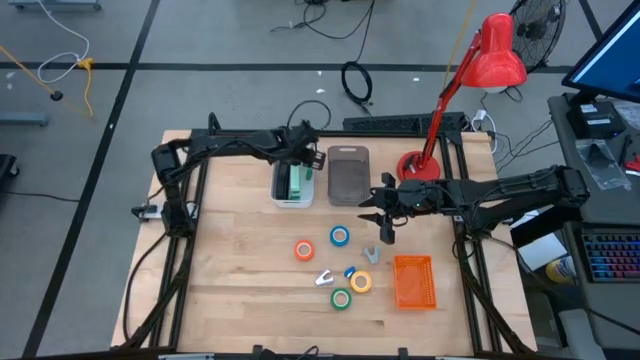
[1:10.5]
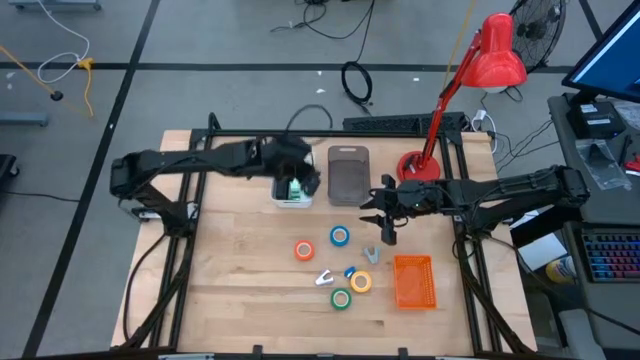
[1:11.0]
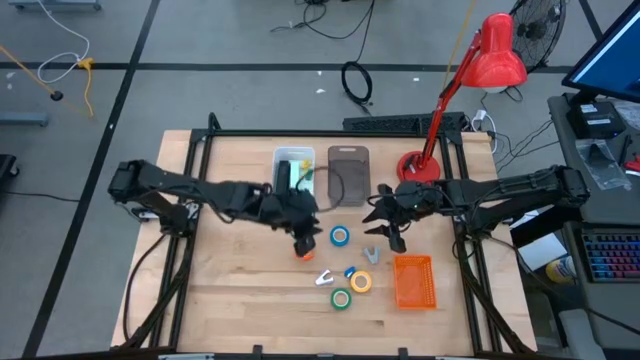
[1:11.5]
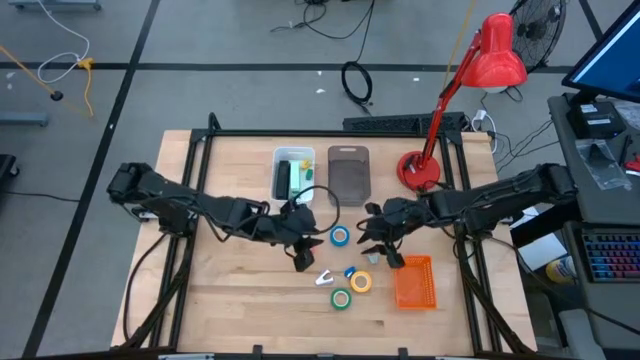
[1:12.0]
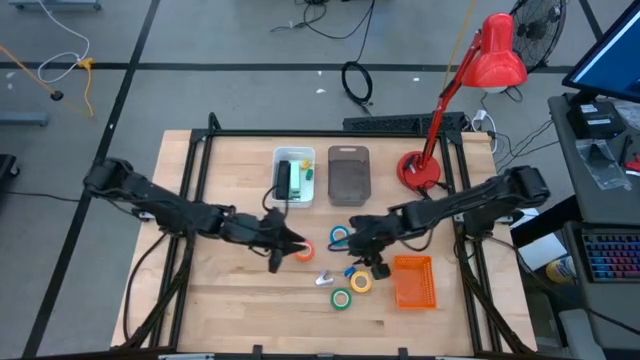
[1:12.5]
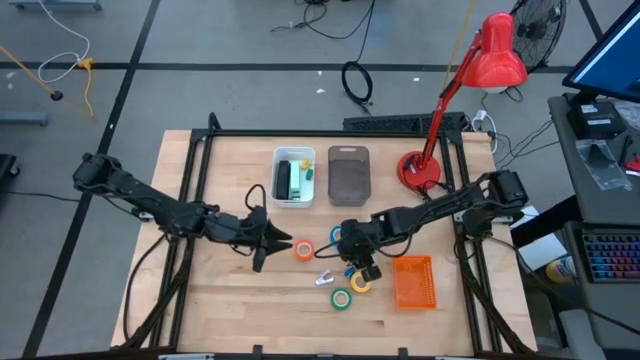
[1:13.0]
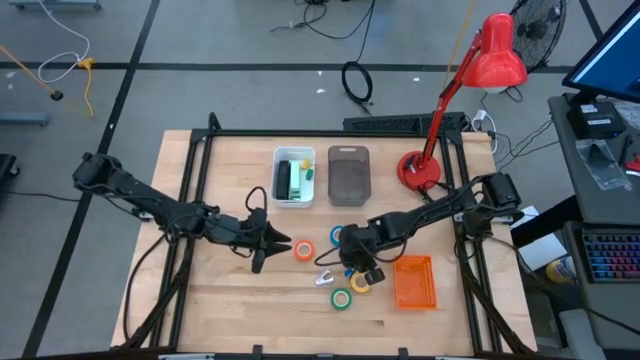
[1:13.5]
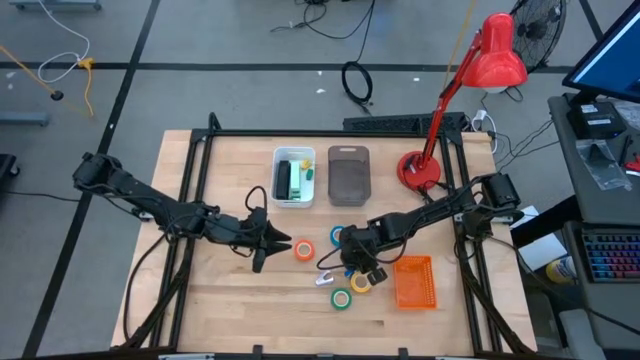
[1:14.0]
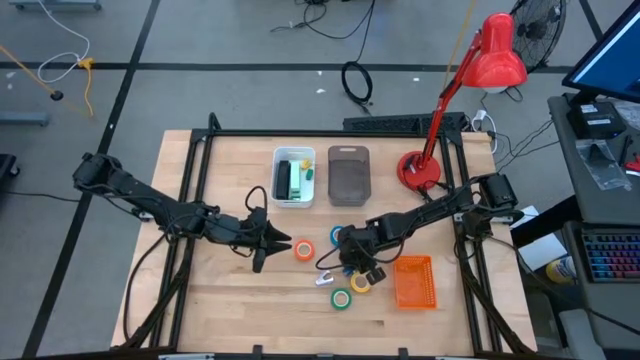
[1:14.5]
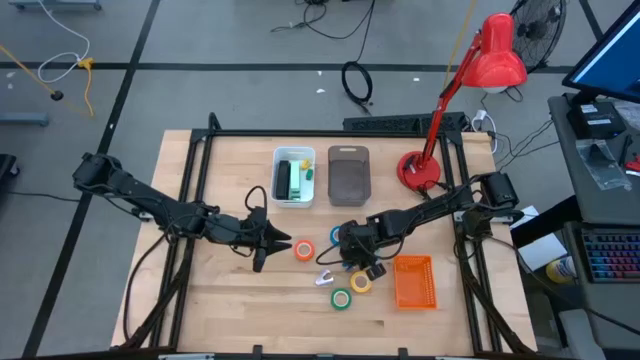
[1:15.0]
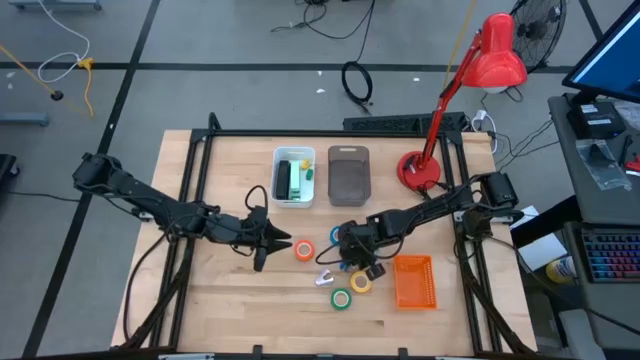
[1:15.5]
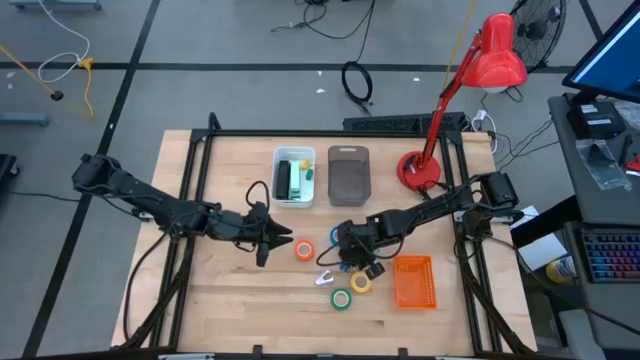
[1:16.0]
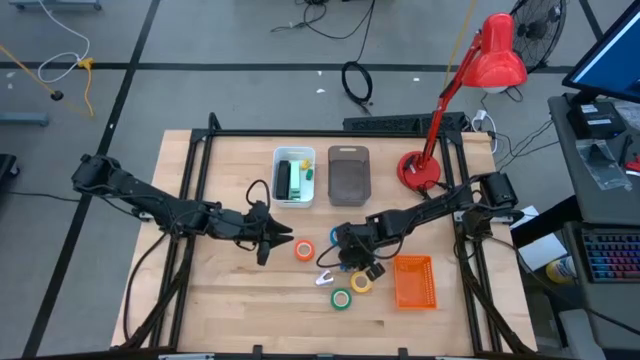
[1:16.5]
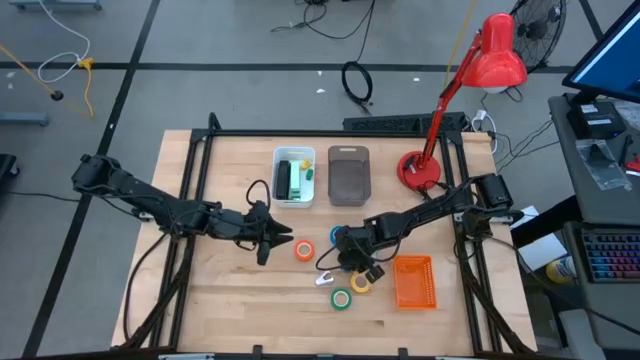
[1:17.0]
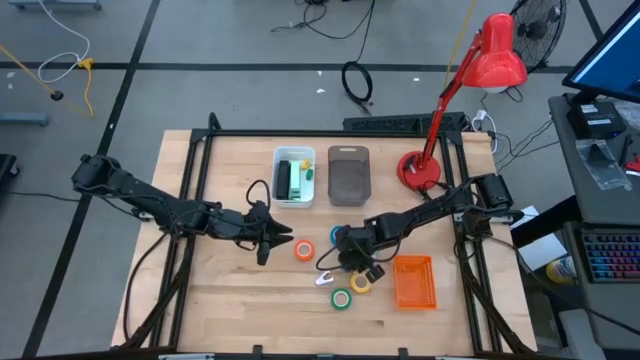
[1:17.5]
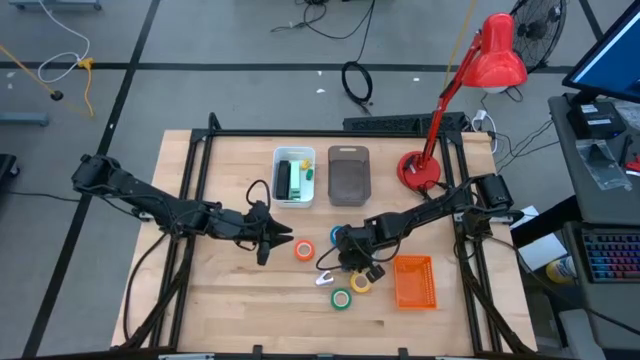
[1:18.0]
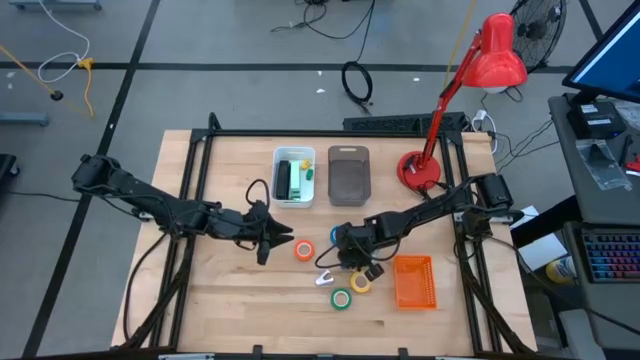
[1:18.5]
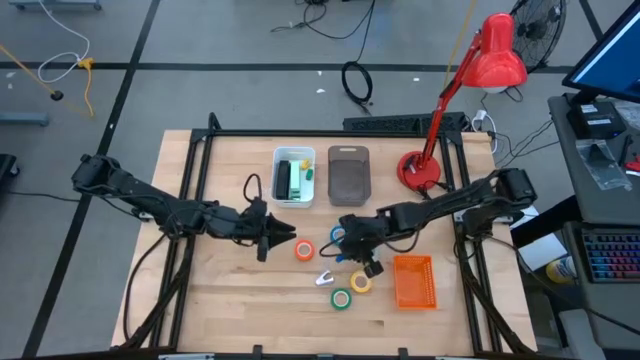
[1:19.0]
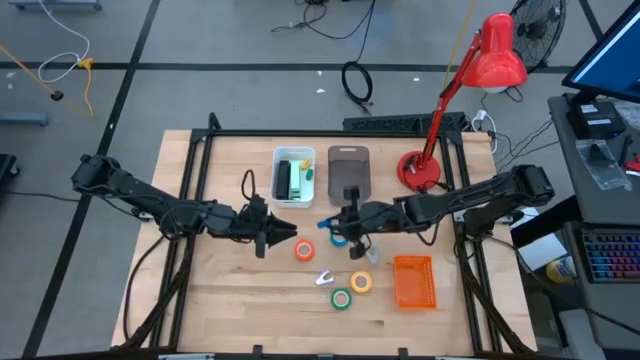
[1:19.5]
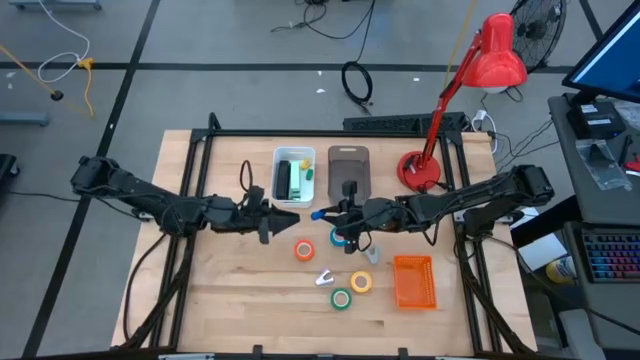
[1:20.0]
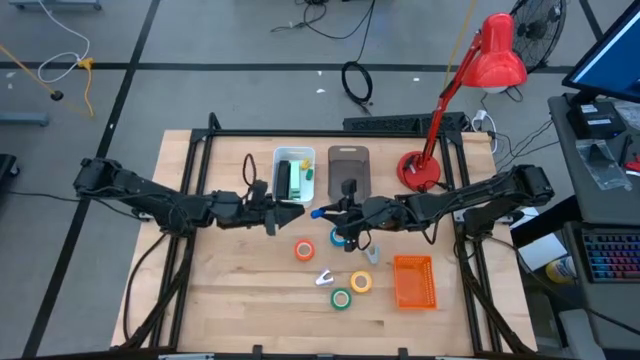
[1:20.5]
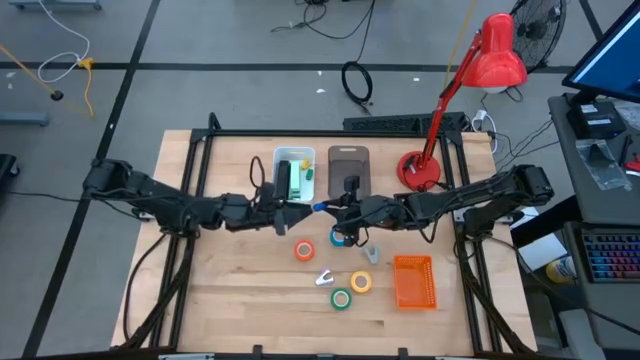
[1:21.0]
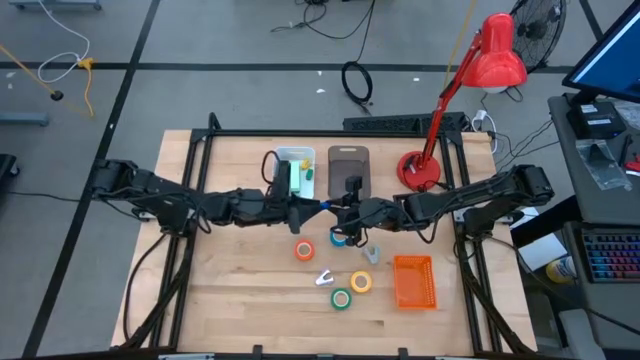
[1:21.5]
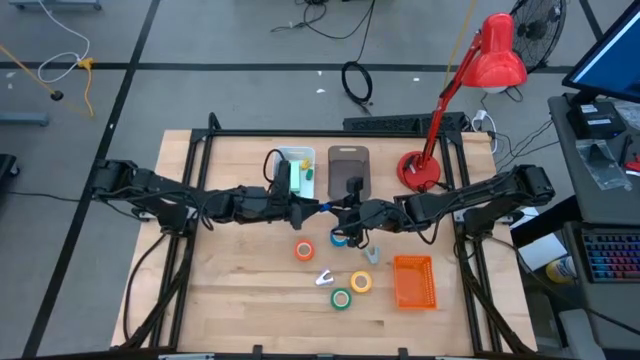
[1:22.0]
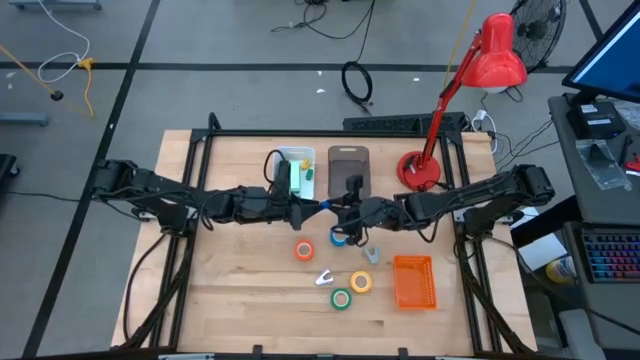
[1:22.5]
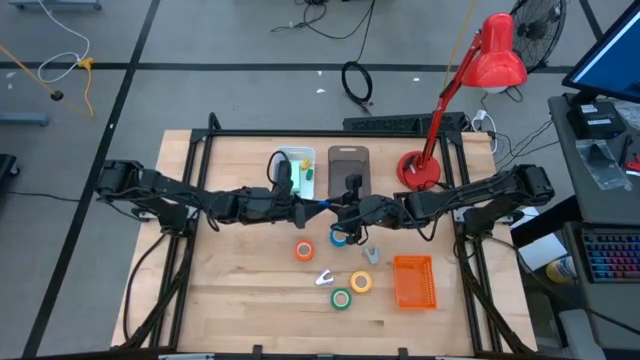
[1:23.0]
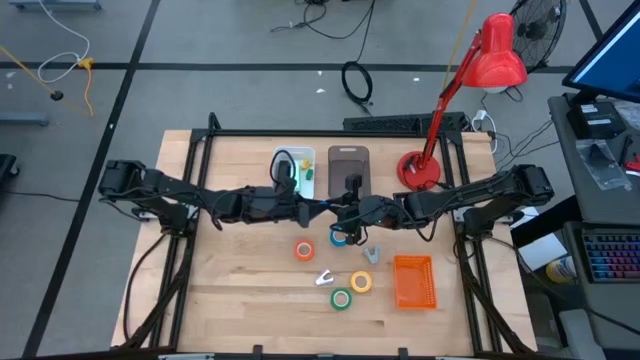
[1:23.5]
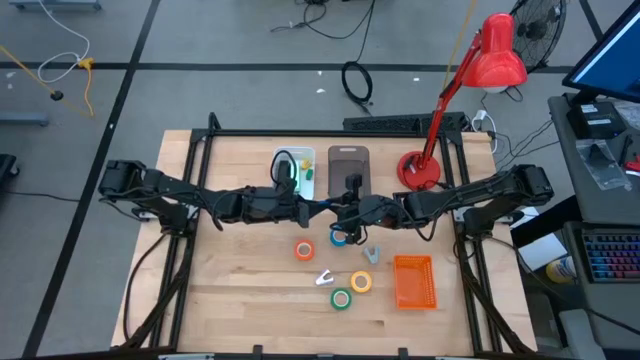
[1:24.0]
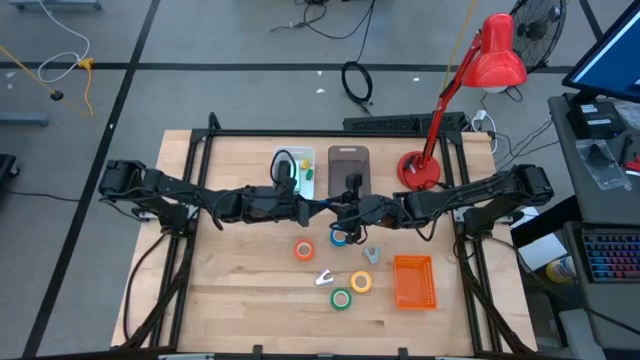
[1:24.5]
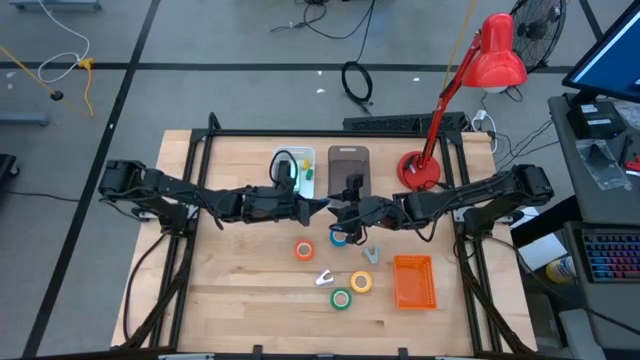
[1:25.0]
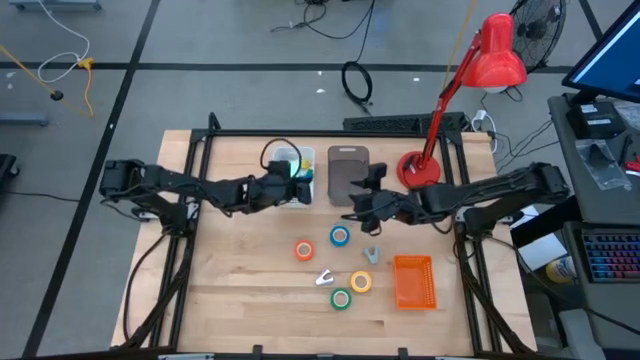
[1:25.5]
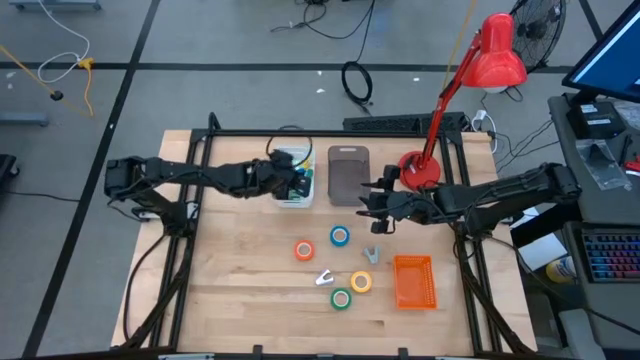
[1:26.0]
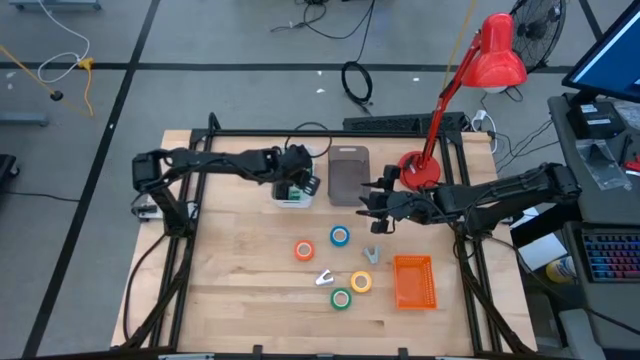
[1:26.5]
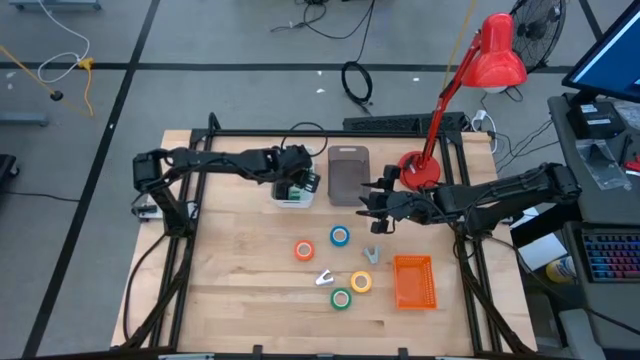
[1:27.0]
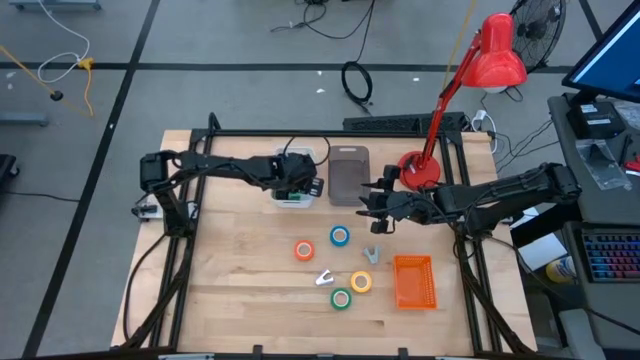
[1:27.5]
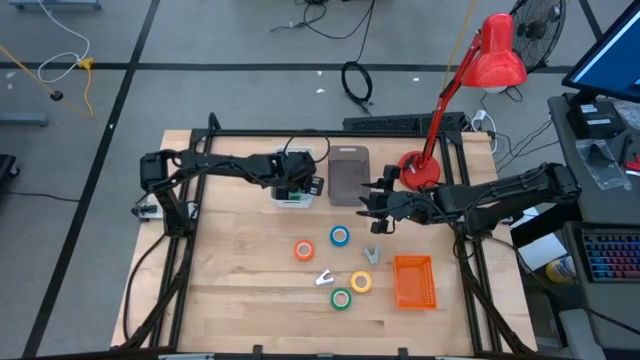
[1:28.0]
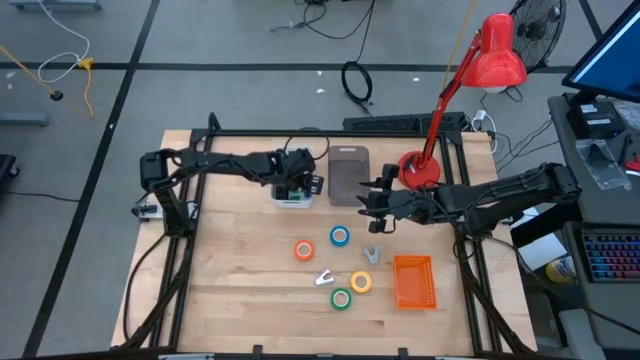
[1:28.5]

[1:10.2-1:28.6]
Task: Pick and place Stapler, Stapler remover, tape
Put the blue stapler into the white bin
